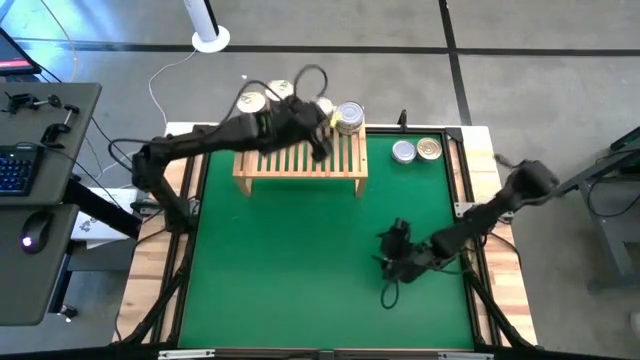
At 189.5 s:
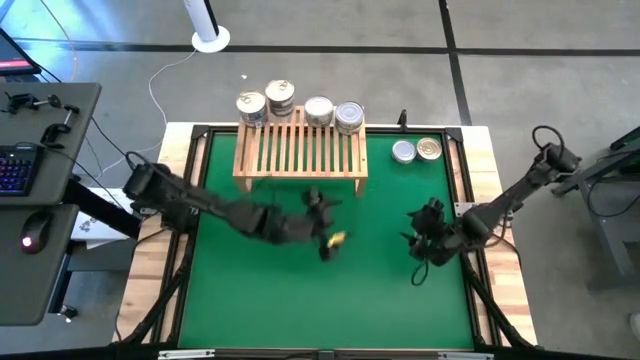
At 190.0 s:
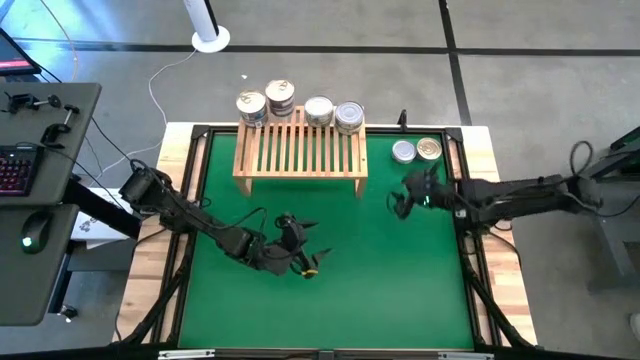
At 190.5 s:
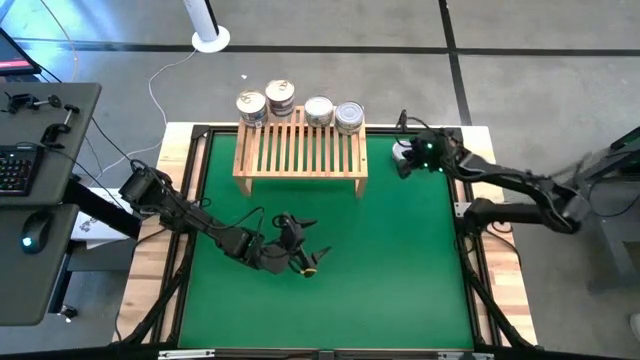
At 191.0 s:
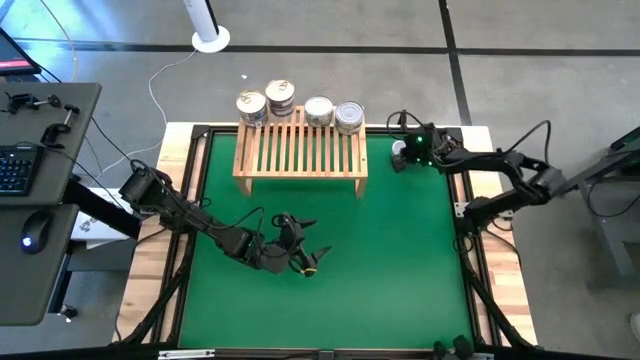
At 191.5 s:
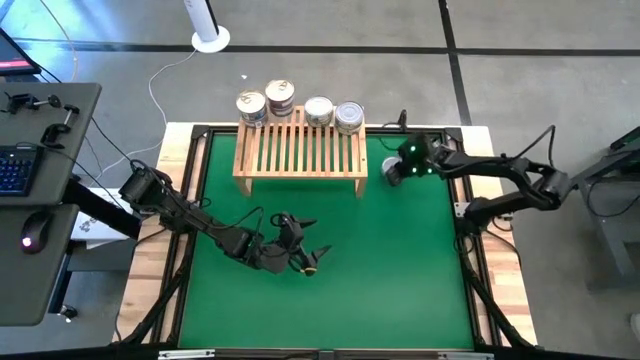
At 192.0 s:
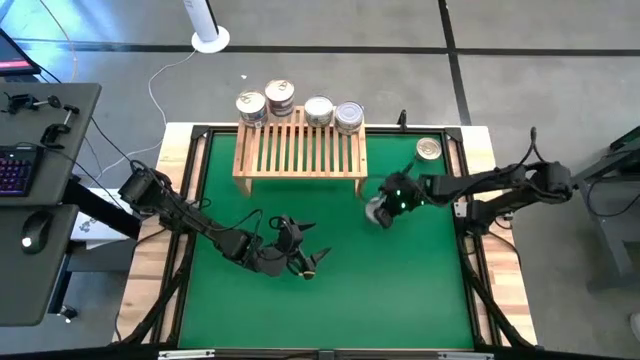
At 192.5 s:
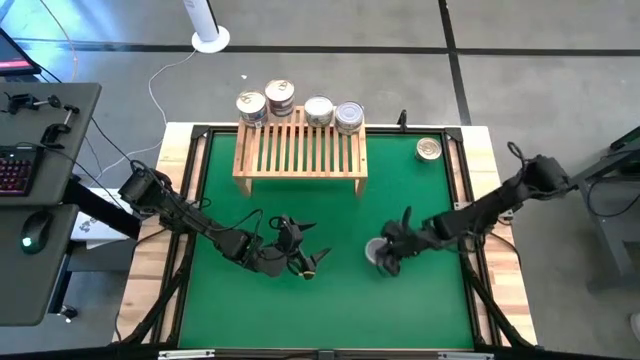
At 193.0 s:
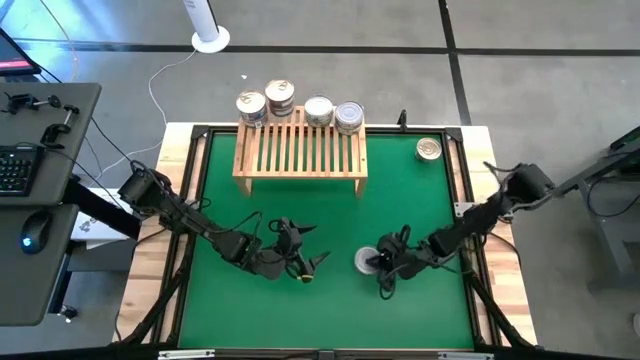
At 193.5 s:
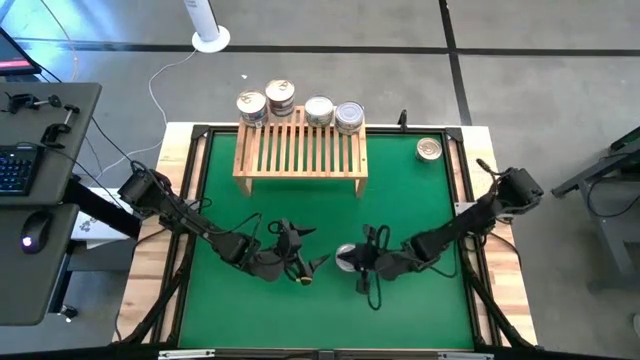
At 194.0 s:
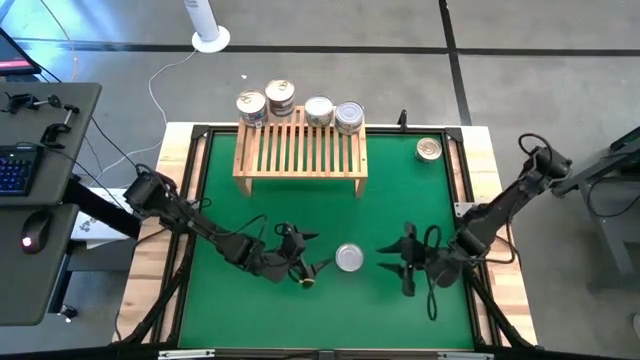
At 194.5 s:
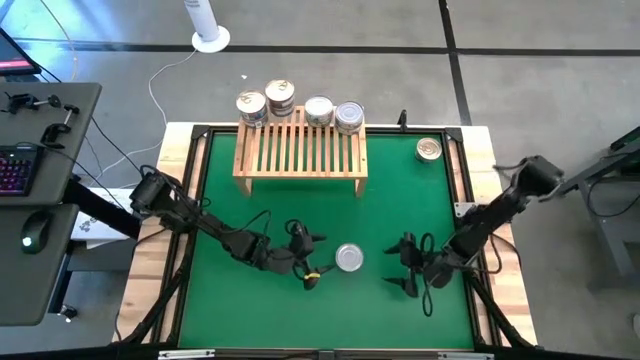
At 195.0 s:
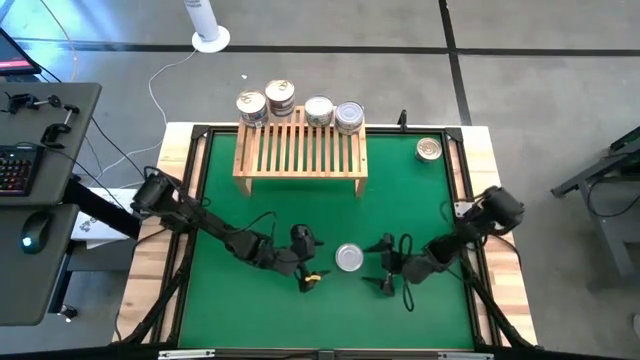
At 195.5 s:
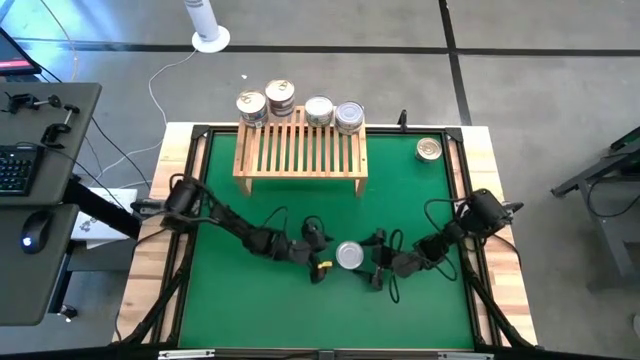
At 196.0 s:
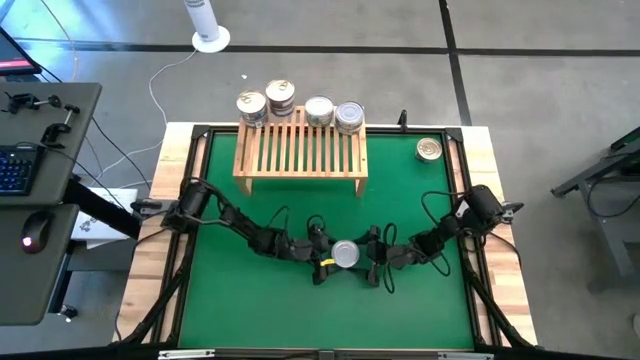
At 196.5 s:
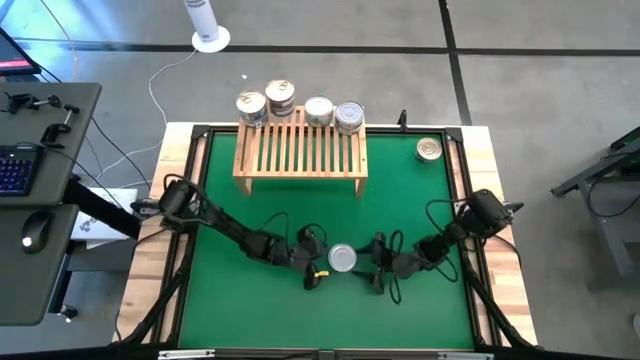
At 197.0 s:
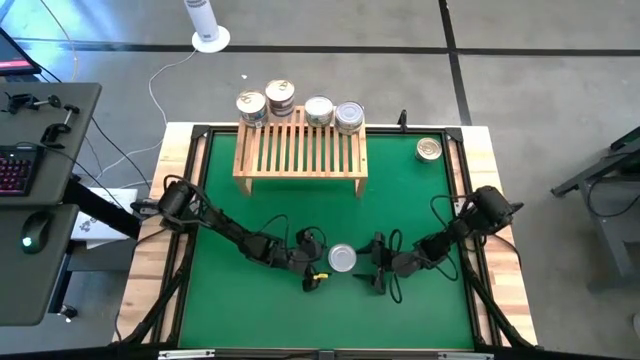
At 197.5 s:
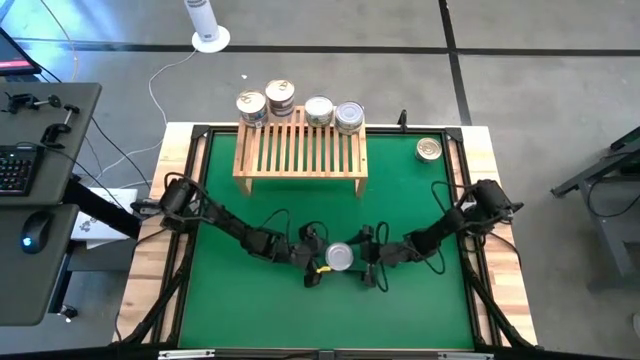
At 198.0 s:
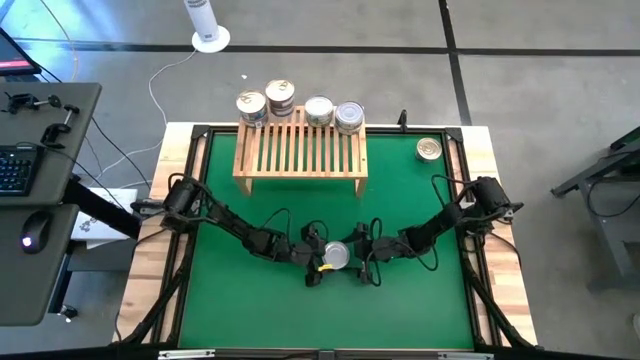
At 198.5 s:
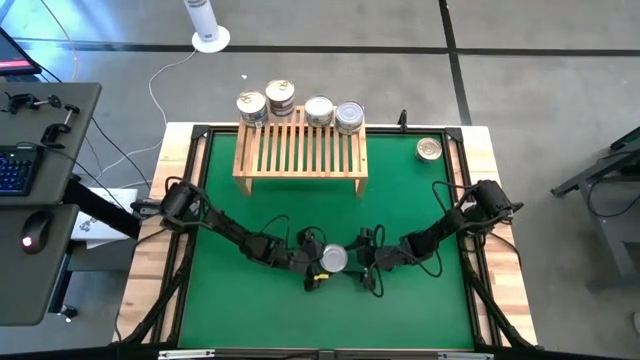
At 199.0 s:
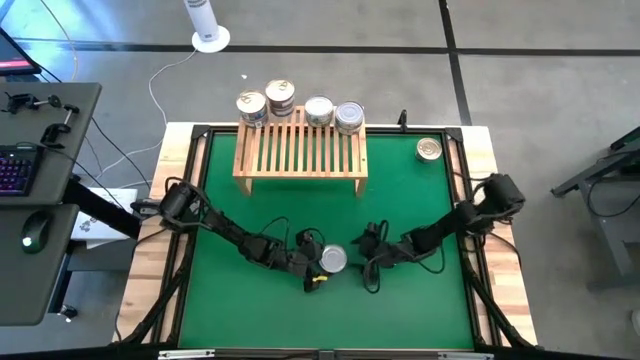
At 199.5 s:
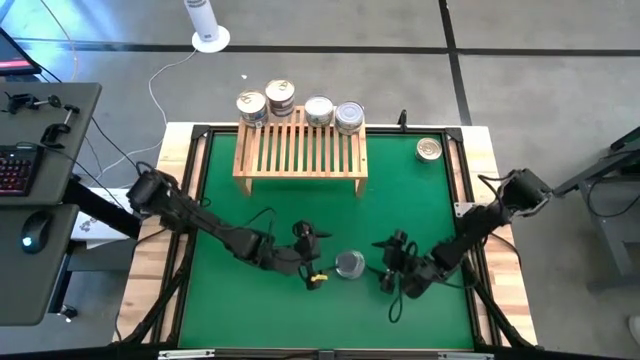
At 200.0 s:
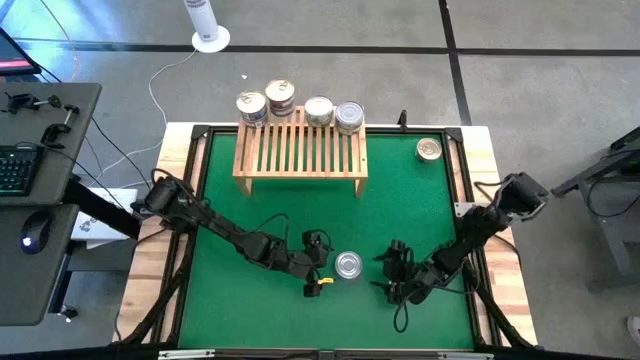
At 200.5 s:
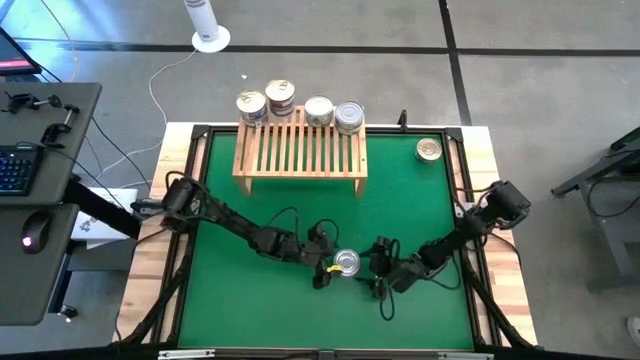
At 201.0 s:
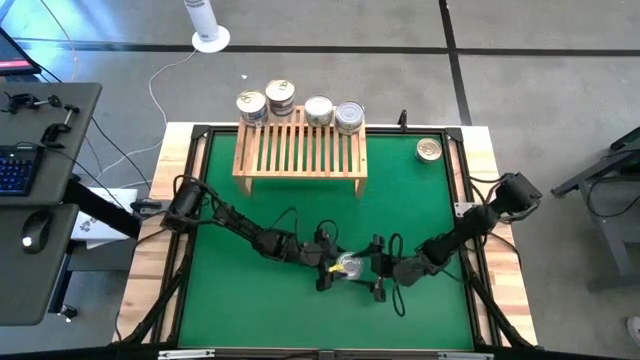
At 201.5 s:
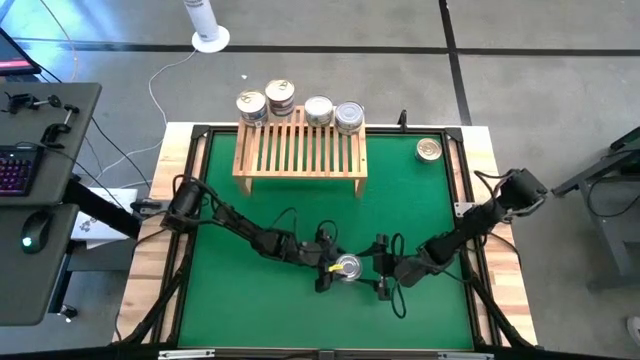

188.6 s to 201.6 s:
Task: Stack canned seafood by type on shelf
Put the green white tuna can on the shelf

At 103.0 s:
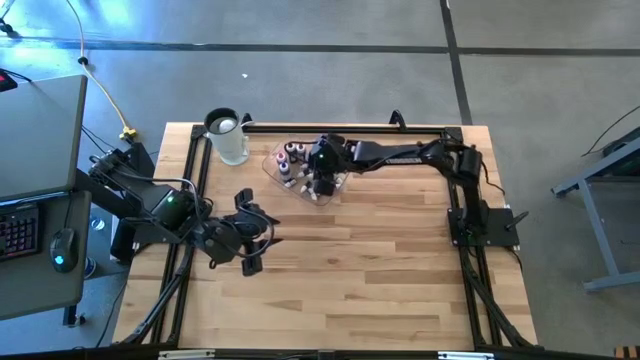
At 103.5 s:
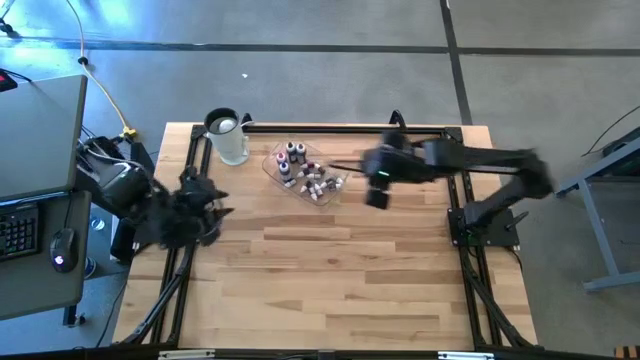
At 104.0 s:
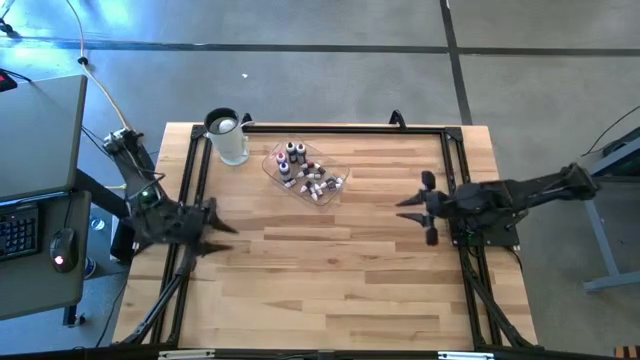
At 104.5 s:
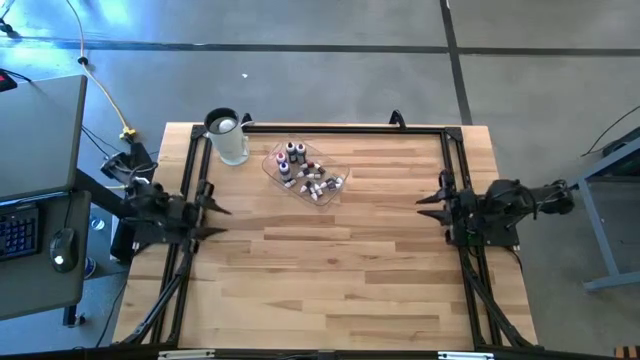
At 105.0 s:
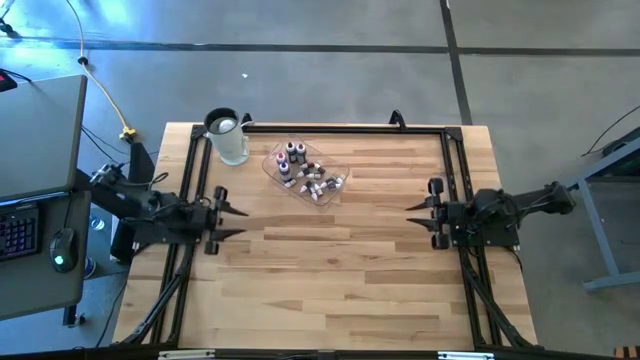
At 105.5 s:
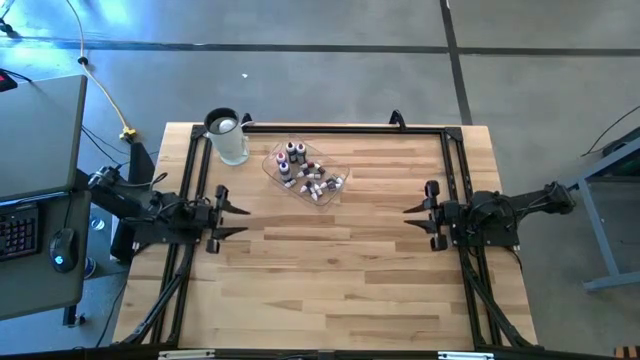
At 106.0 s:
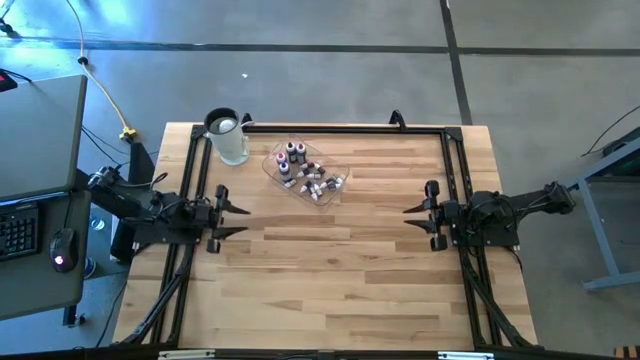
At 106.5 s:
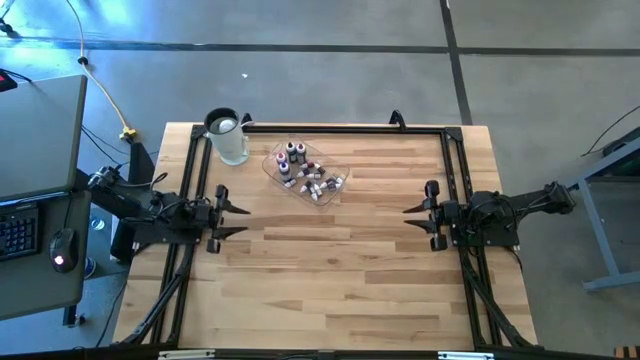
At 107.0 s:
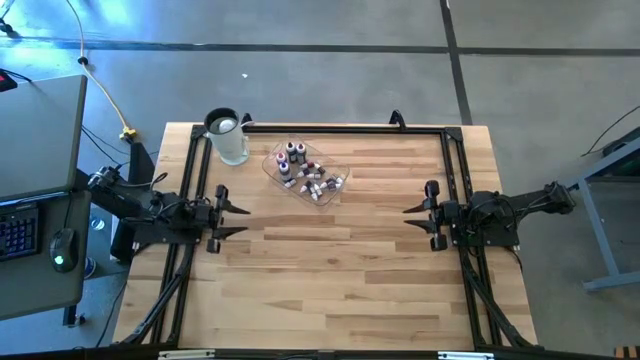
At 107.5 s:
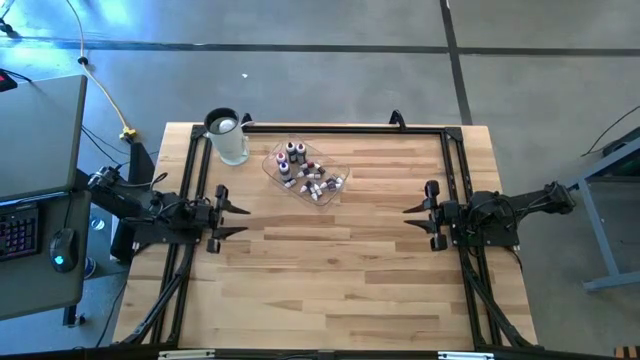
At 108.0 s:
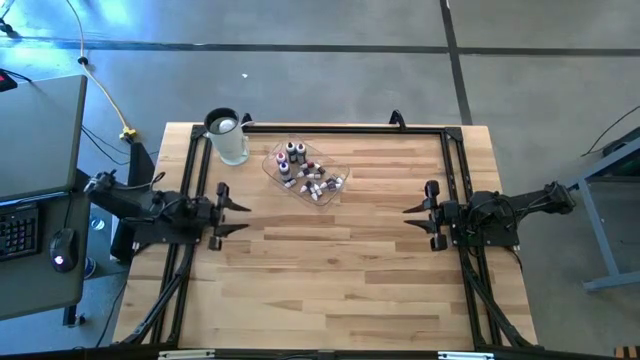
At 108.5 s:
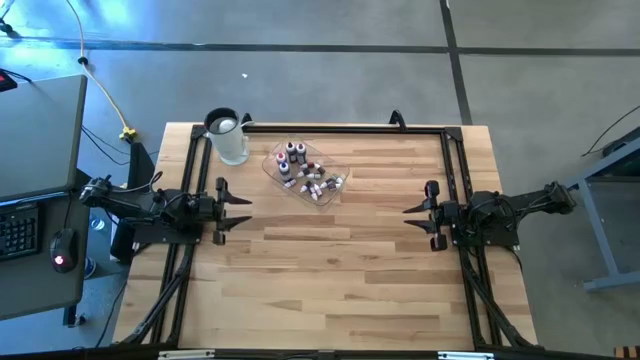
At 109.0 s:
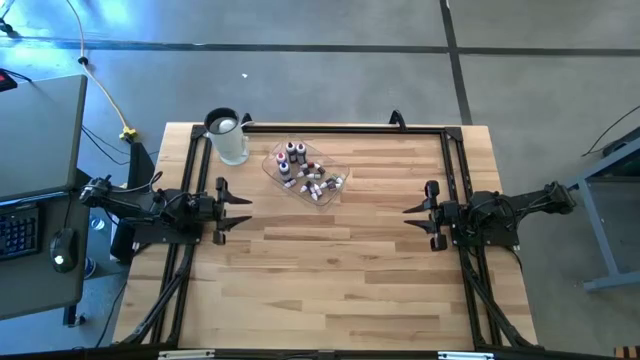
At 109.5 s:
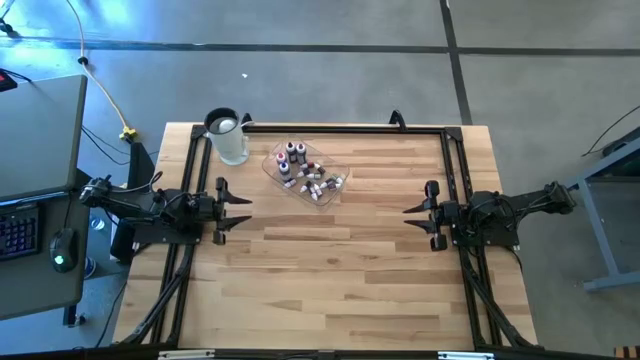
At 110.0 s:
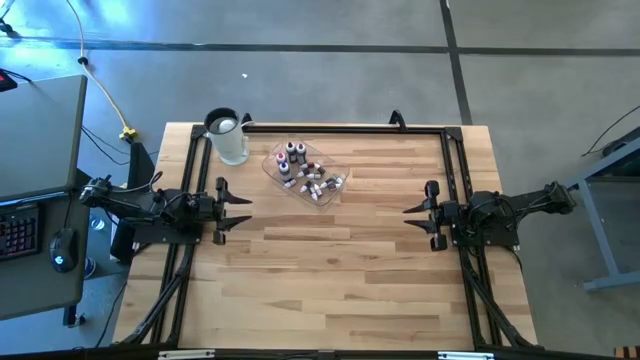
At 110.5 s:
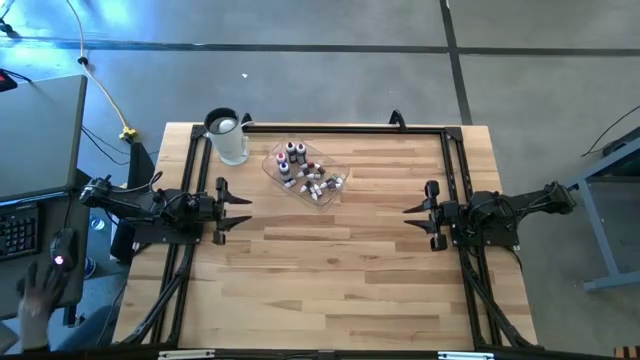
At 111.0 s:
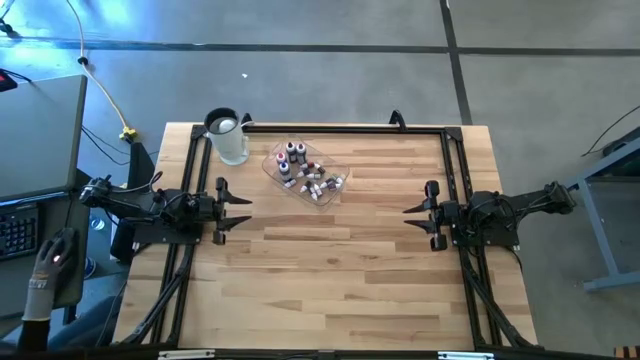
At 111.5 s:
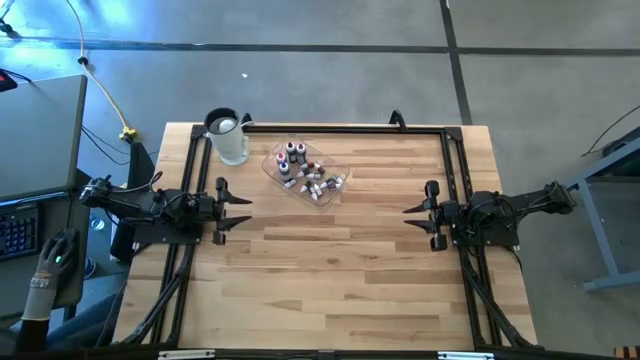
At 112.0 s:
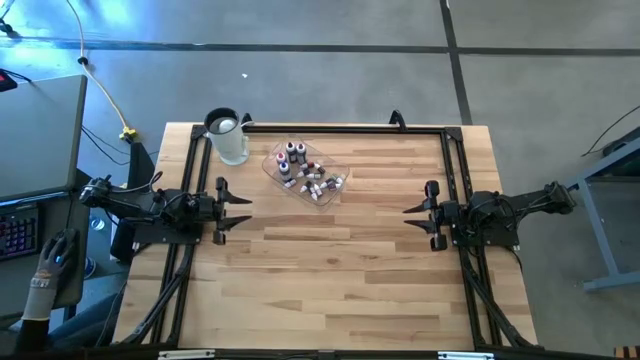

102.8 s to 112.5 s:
Task: Pick & Place food coloring
Return to Home Position
